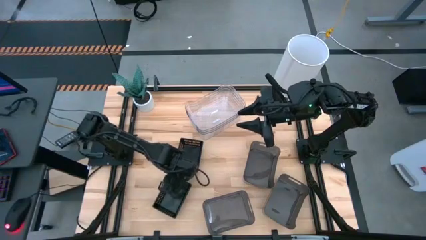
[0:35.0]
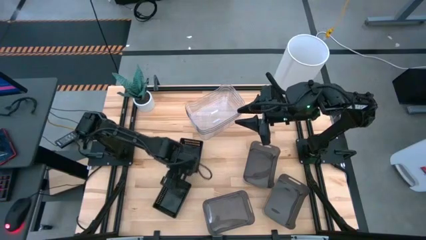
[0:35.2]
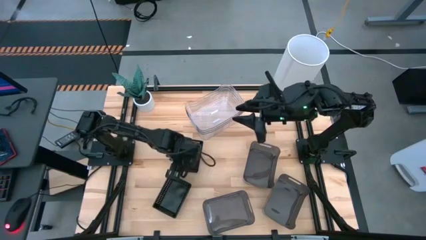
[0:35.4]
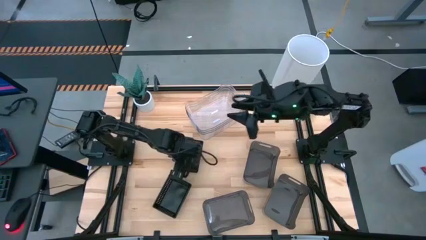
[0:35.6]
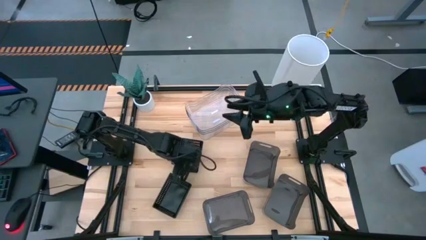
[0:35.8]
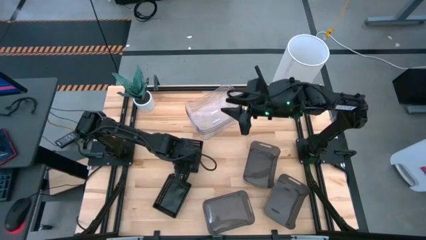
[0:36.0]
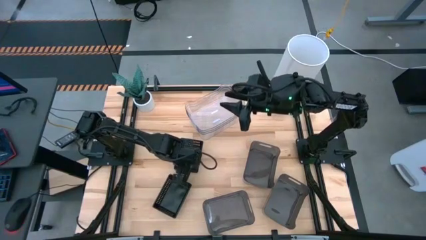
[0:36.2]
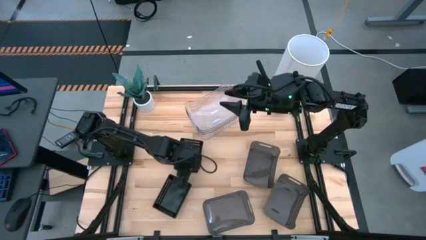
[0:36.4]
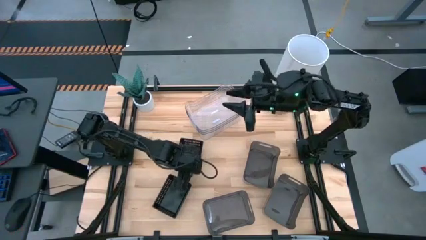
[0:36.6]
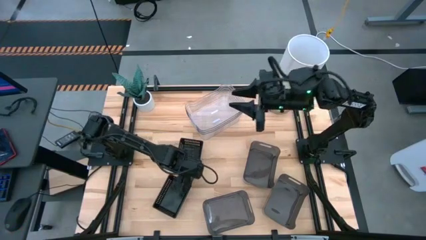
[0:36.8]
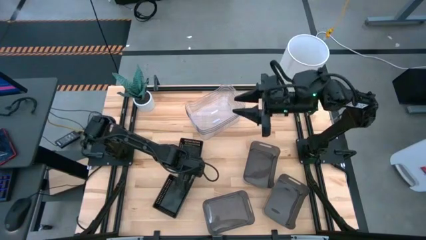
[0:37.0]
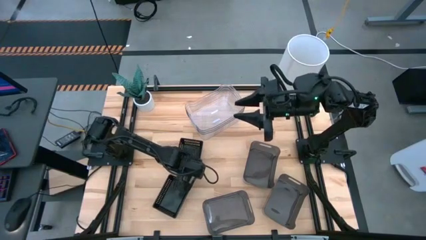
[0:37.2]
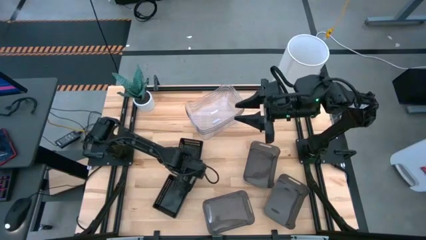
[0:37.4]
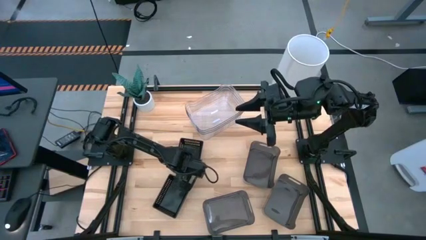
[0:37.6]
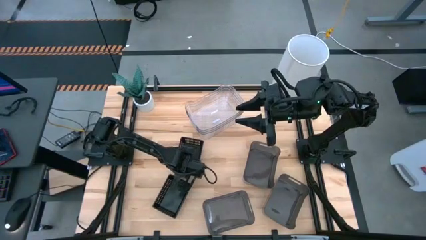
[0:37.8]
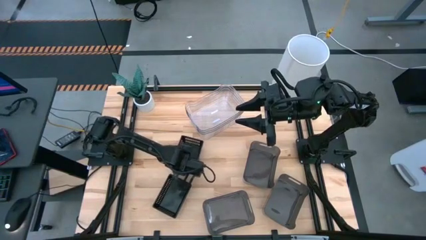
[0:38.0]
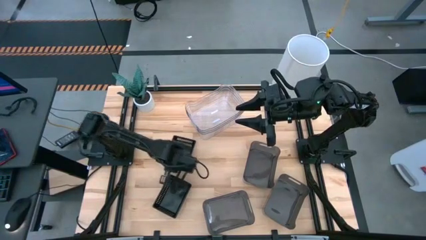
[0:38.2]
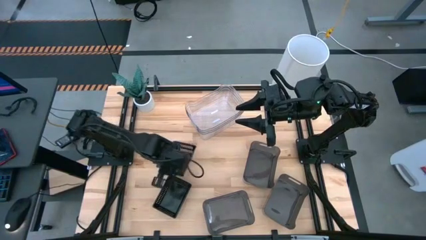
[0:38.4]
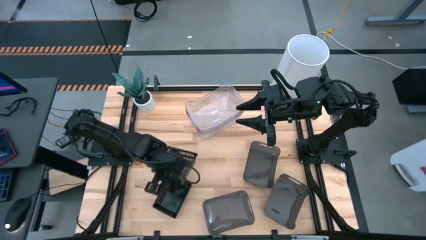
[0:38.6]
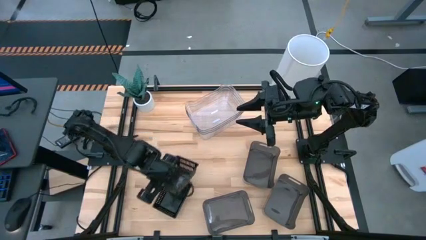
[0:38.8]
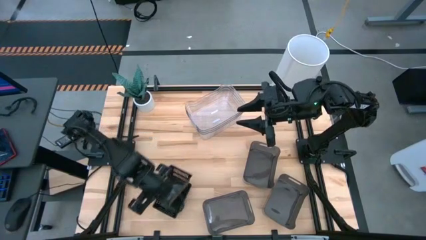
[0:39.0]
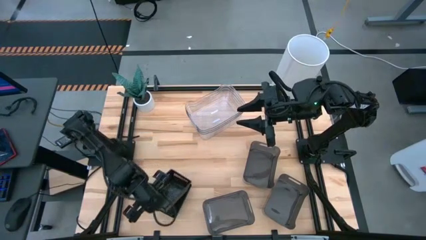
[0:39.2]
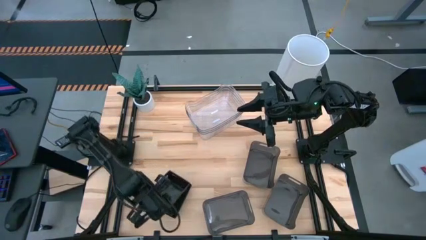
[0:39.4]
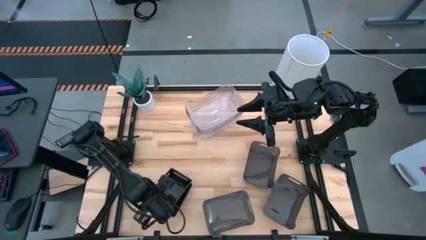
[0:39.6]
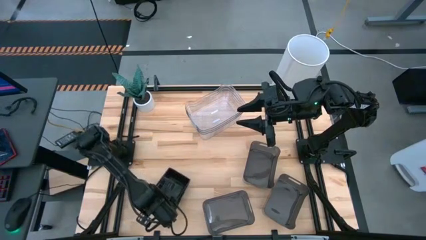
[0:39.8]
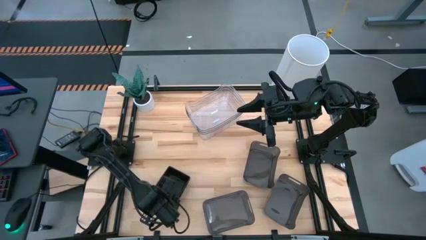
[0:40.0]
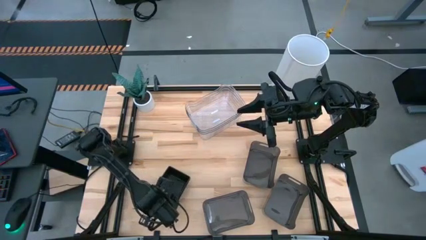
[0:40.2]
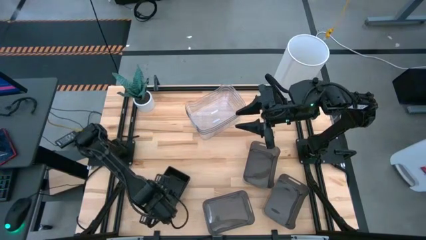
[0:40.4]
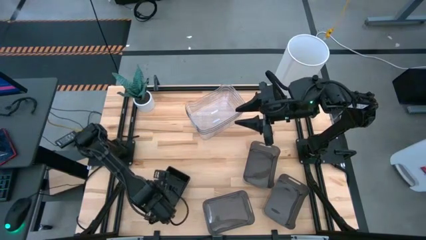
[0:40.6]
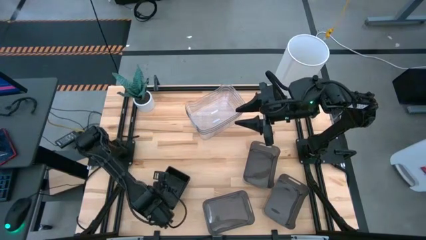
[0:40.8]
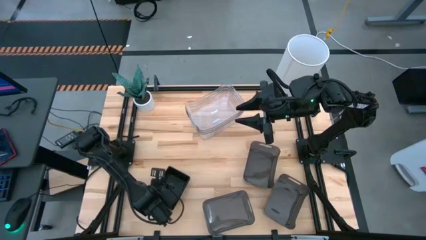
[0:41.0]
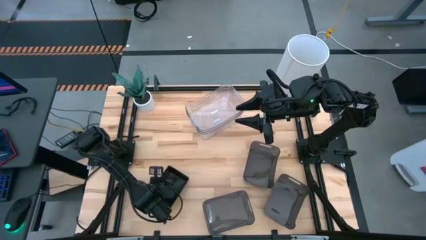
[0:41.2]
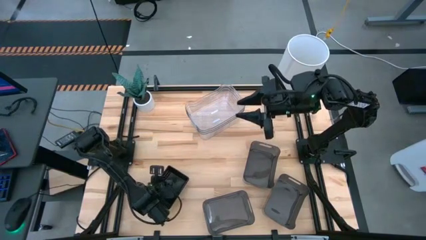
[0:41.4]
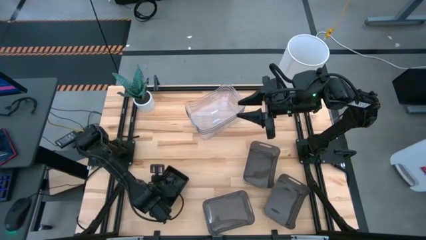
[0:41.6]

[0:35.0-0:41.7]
Stack the top black bin on the top of the black bin

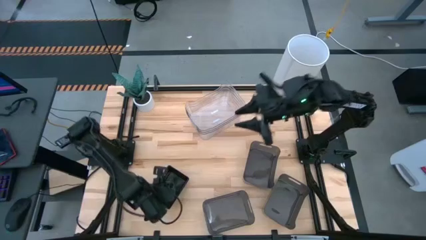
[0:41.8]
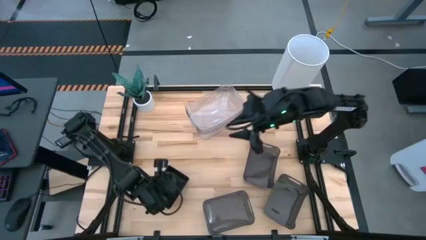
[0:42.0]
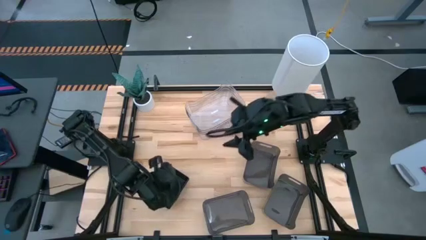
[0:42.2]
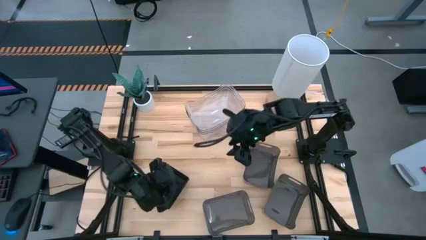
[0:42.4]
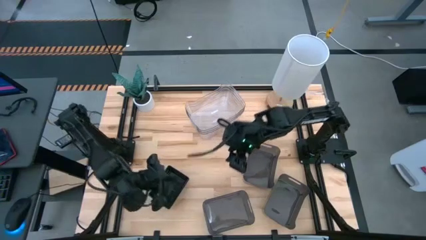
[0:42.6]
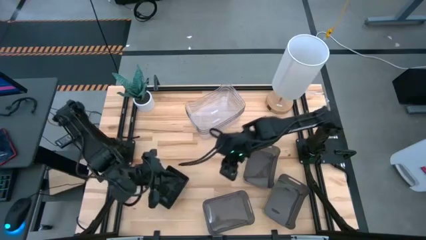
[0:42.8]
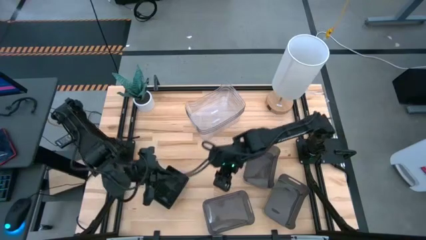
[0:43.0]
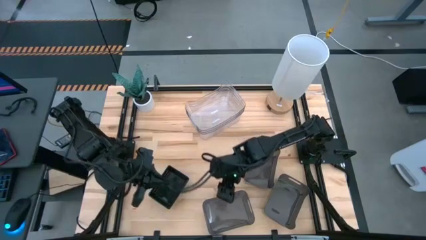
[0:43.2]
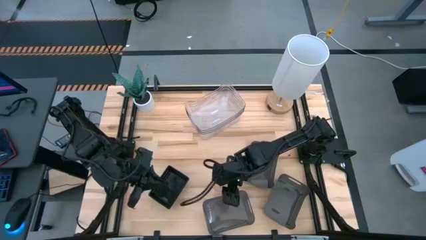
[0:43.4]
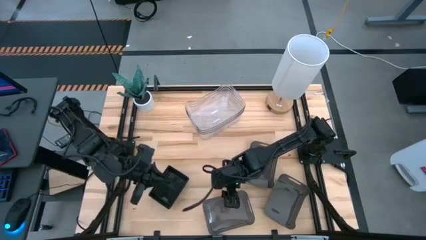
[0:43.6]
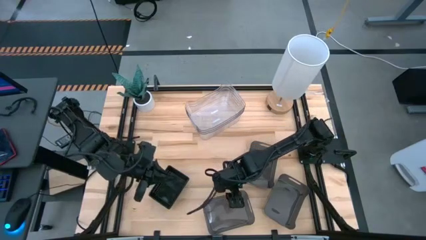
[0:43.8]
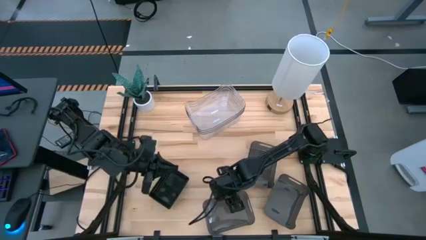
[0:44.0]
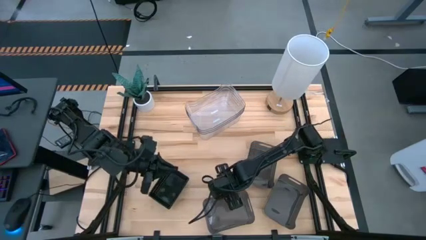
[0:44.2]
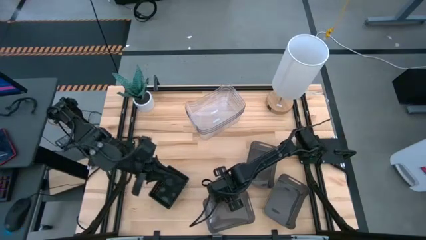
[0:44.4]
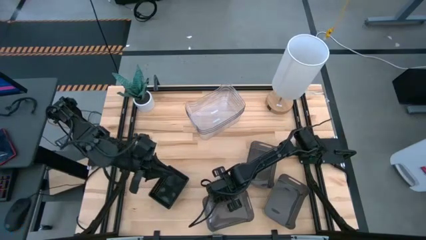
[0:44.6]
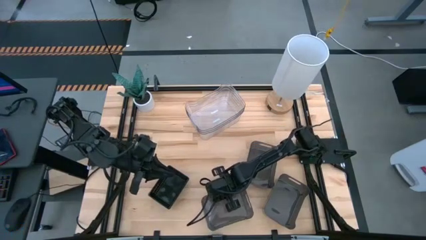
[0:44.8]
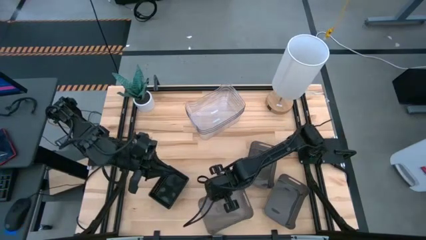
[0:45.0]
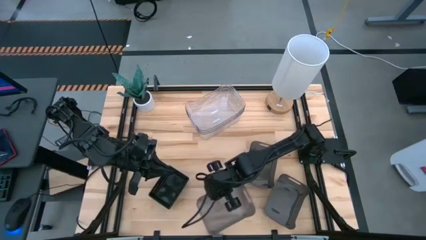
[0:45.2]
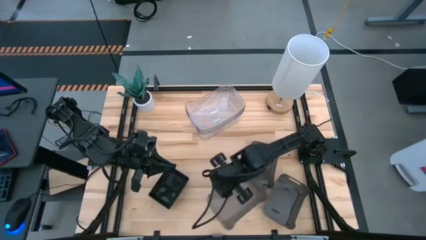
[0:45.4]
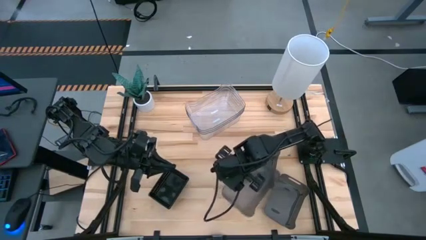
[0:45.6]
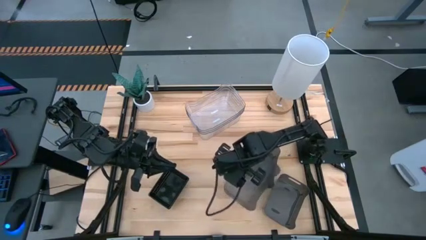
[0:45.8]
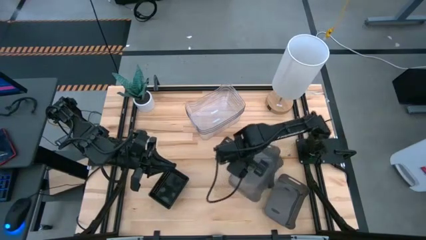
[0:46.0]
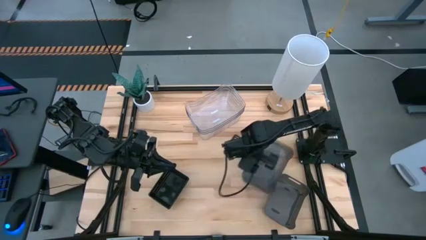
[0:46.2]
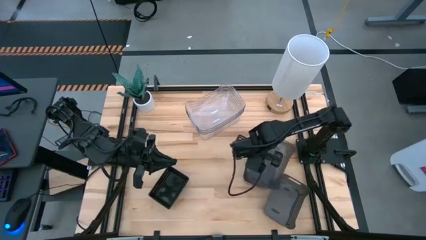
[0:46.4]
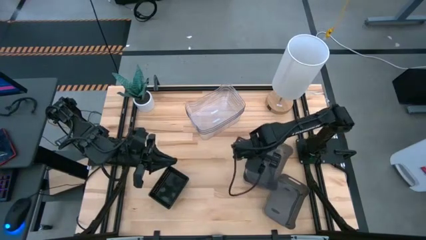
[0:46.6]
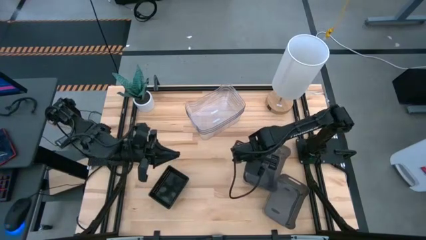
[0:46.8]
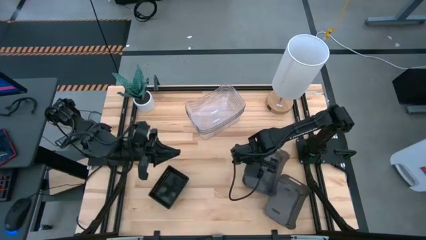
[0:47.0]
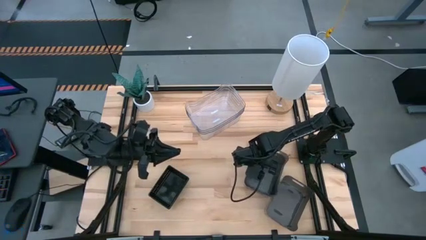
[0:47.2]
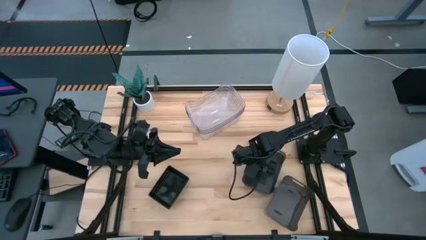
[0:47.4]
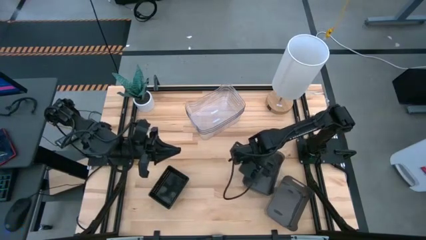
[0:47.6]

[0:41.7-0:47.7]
Stack the bottom left black transparent bin on top of the top black transparent bin

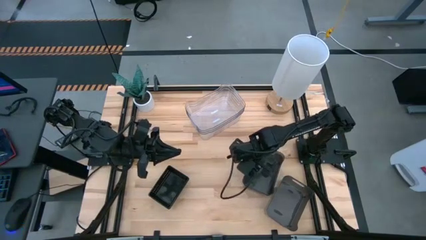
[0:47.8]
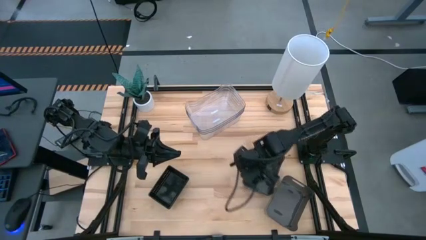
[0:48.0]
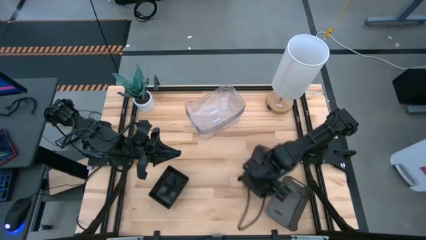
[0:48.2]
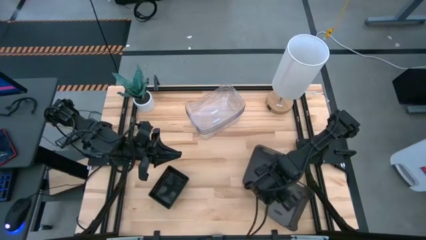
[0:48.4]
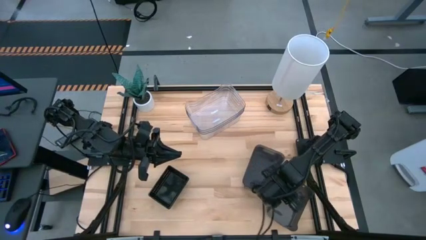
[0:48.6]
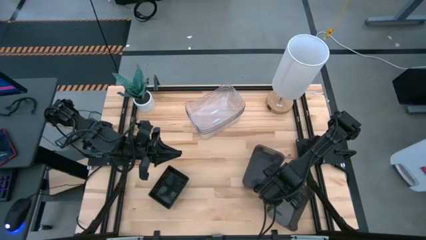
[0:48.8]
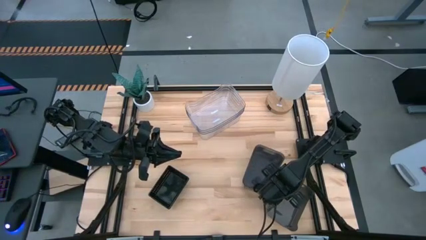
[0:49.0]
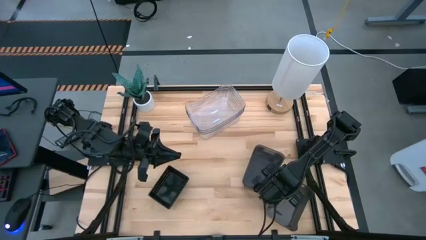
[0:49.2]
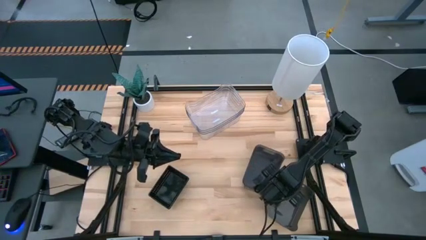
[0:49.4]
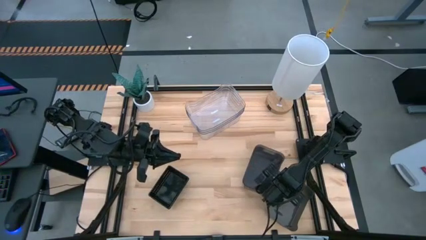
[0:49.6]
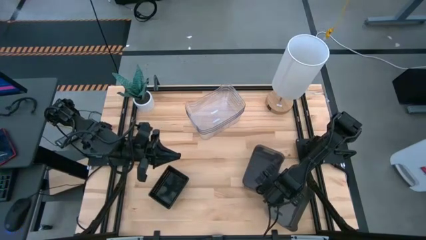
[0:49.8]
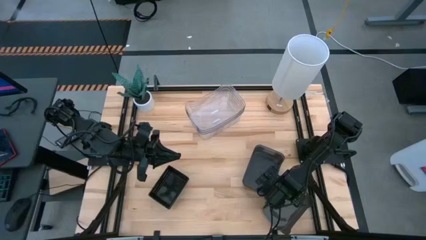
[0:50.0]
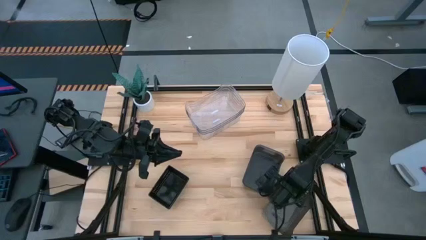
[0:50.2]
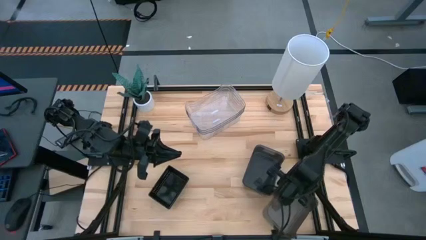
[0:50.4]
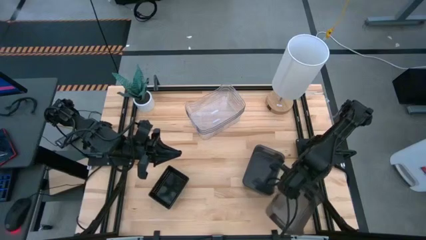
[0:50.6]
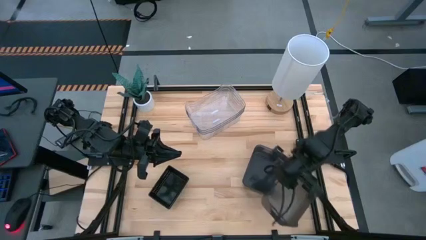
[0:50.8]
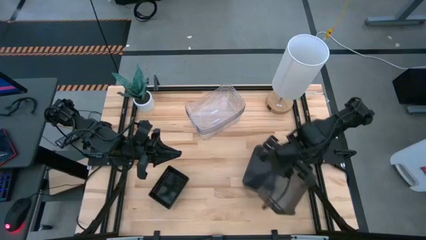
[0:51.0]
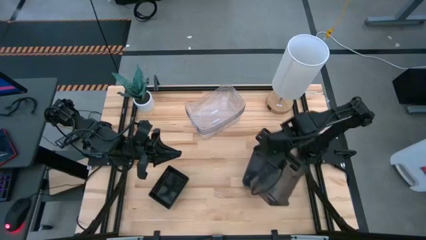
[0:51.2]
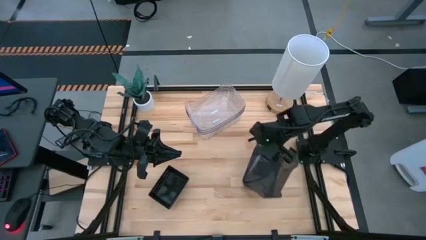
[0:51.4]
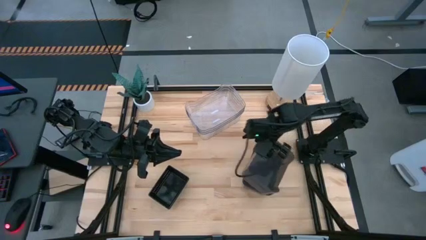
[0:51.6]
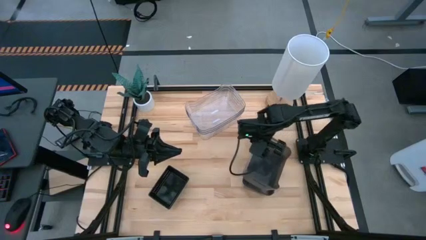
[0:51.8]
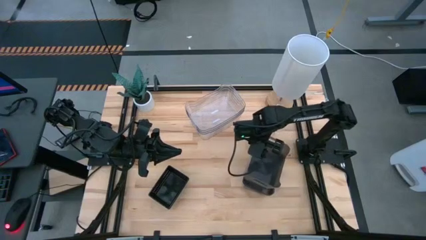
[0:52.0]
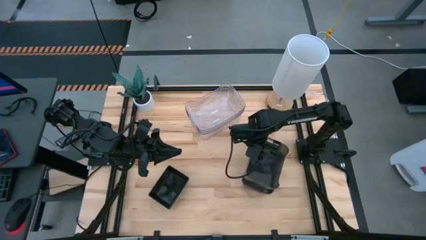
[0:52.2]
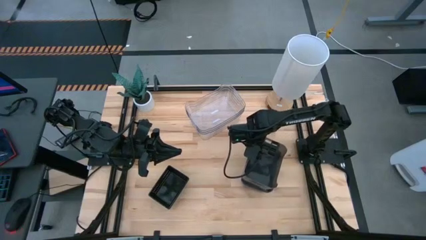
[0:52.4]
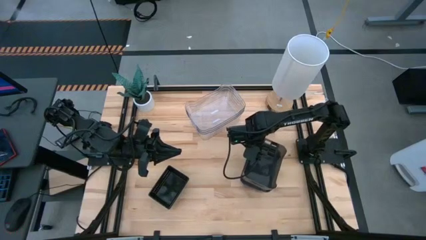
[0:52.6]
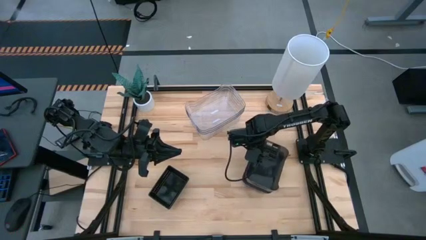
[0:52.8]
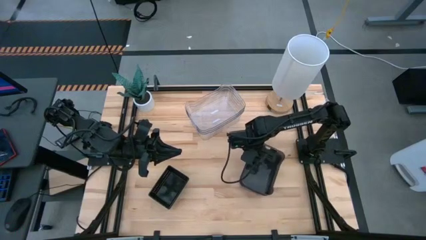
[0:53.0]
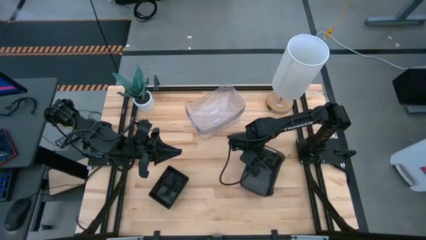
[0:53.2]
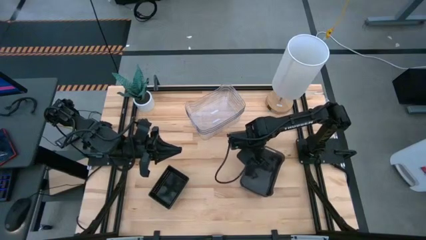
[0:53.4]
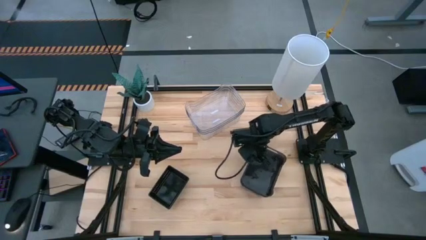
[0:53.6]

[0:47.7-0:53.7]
Stack the bottom black transparent bin on top of the black transparent bin
